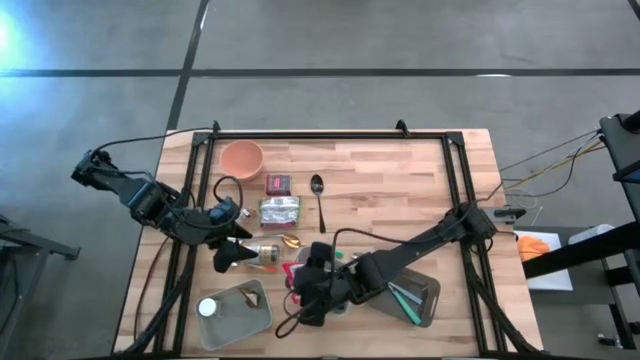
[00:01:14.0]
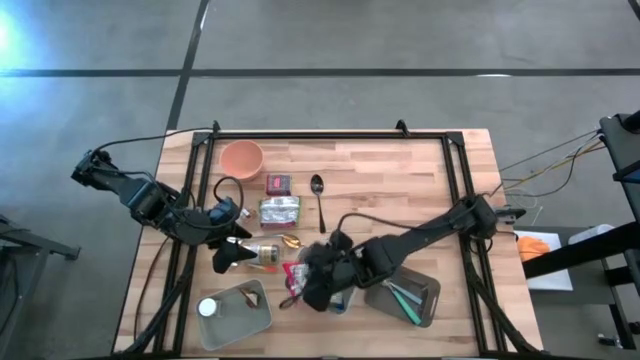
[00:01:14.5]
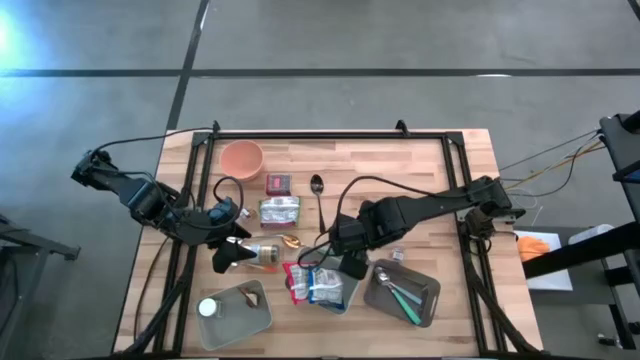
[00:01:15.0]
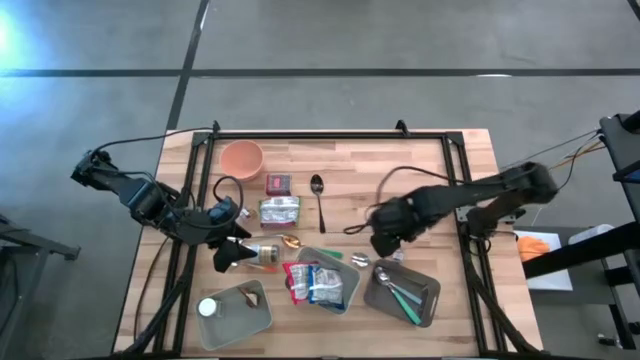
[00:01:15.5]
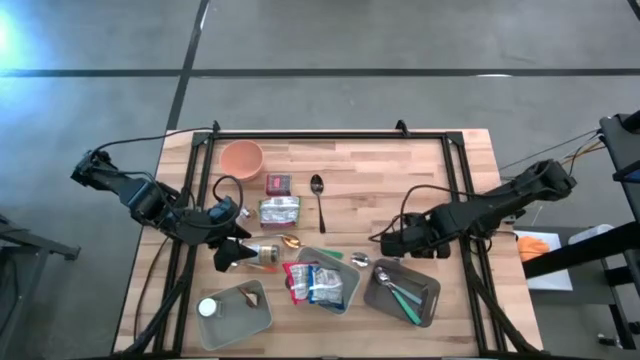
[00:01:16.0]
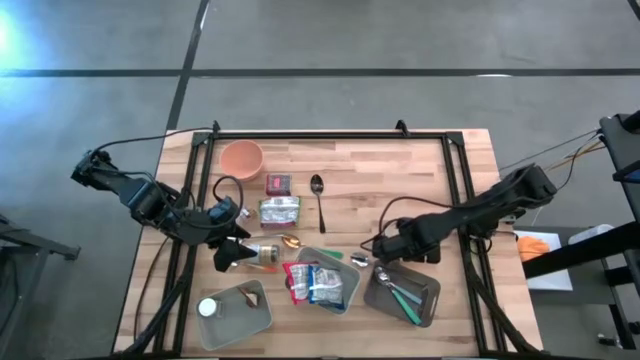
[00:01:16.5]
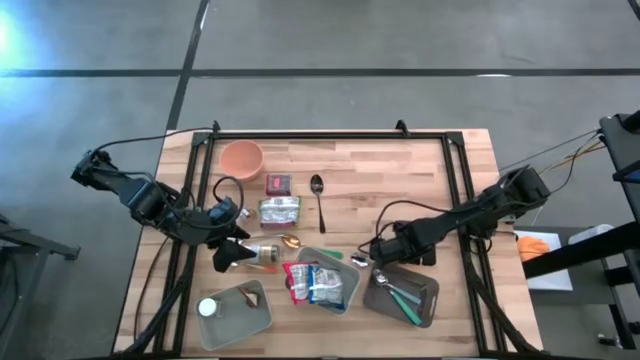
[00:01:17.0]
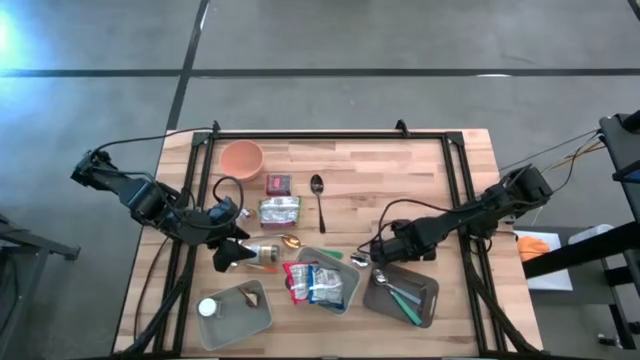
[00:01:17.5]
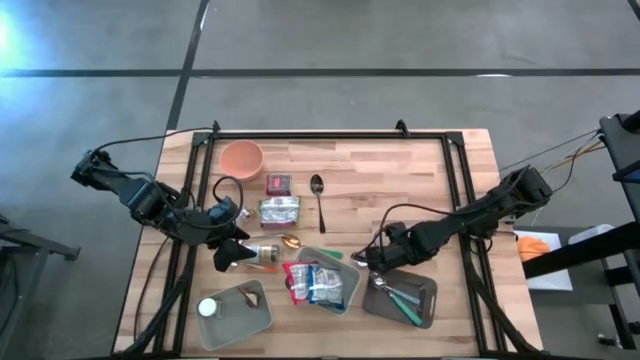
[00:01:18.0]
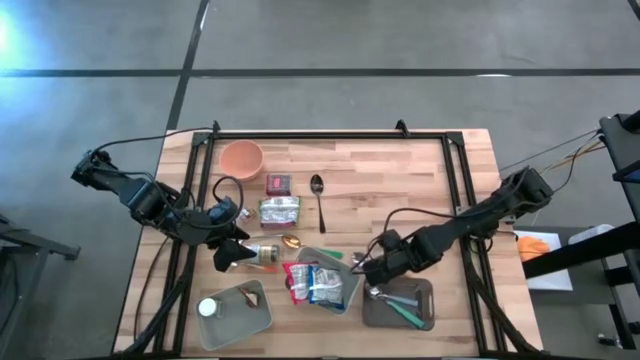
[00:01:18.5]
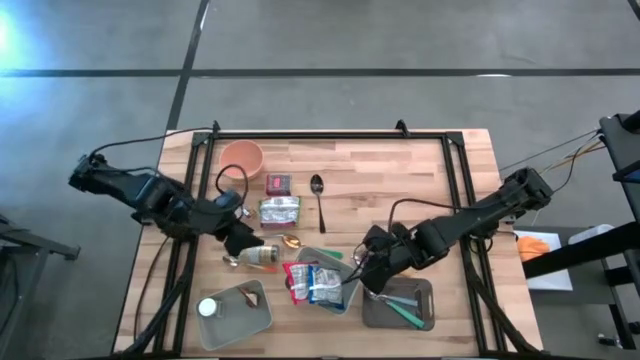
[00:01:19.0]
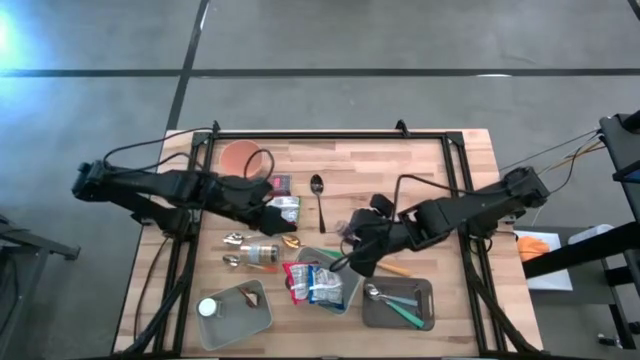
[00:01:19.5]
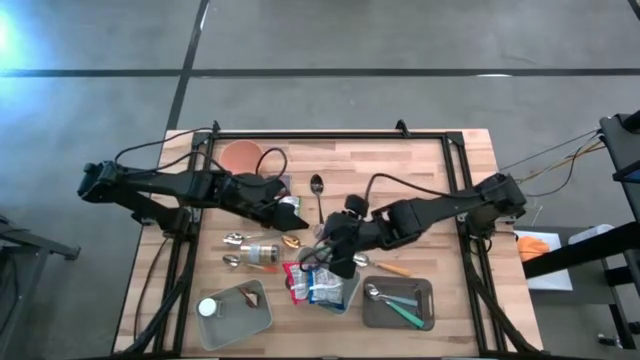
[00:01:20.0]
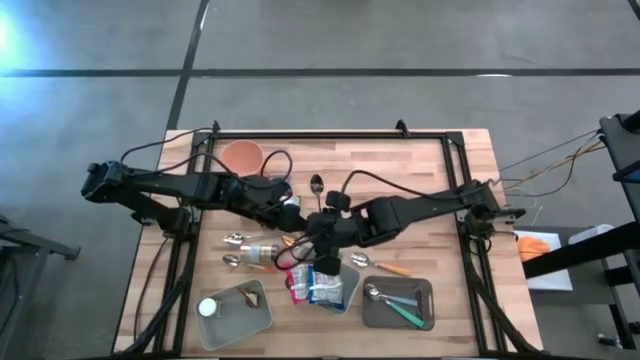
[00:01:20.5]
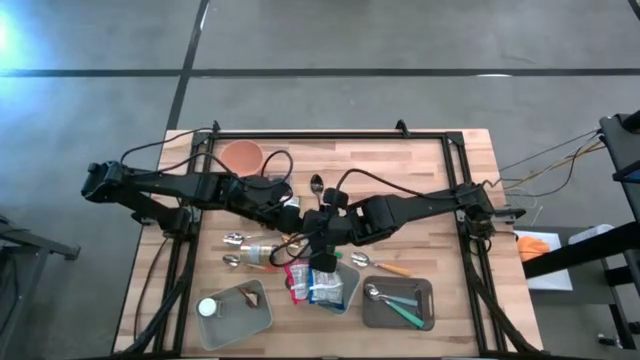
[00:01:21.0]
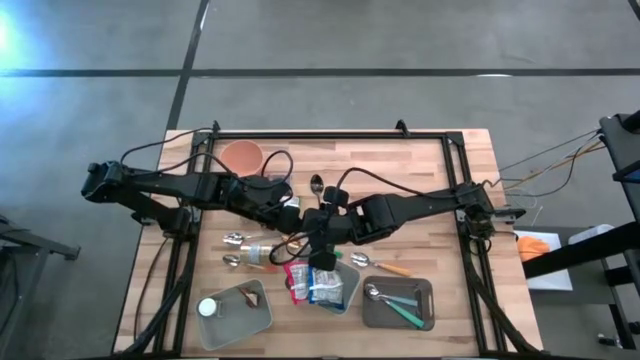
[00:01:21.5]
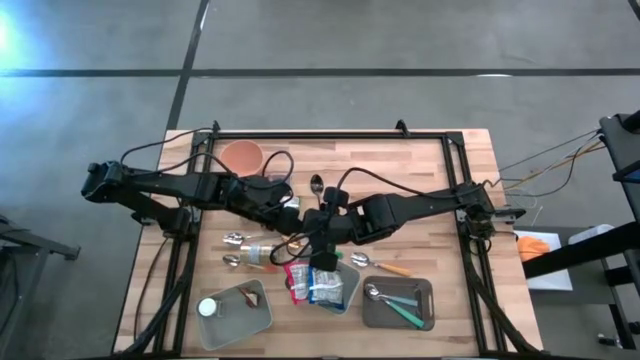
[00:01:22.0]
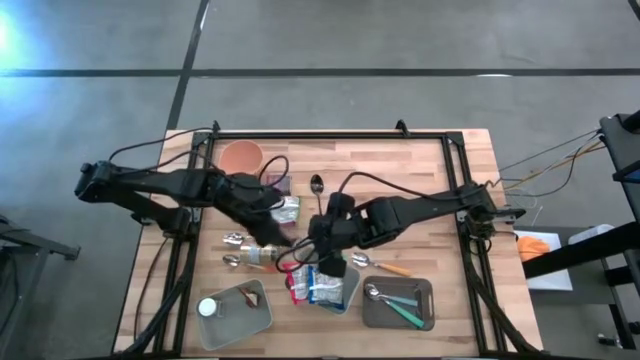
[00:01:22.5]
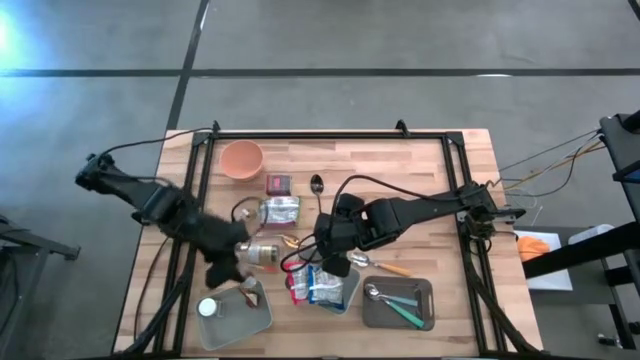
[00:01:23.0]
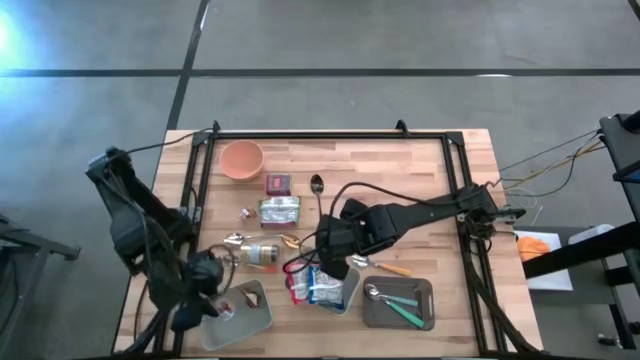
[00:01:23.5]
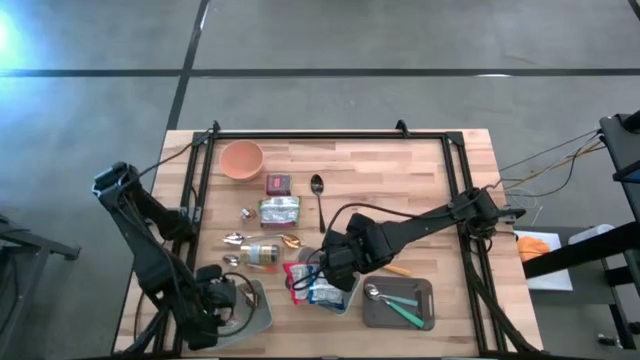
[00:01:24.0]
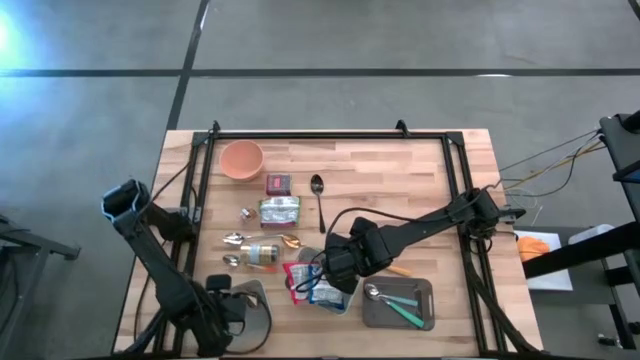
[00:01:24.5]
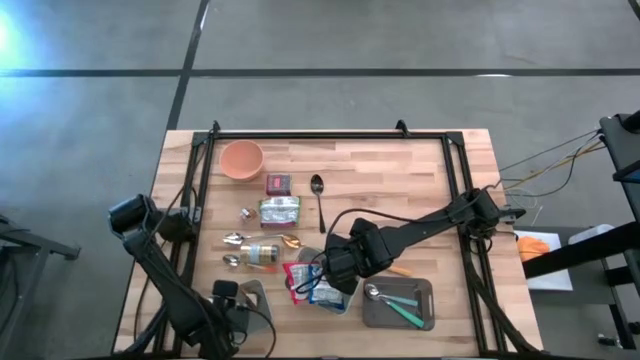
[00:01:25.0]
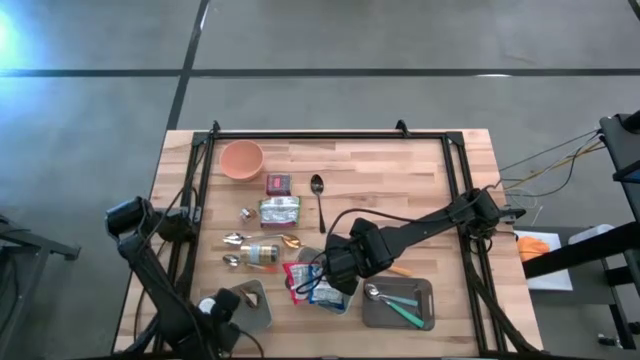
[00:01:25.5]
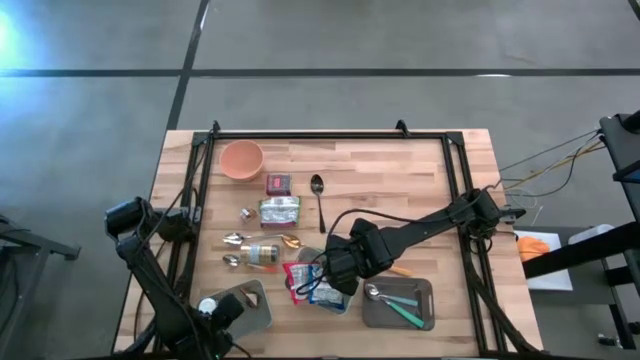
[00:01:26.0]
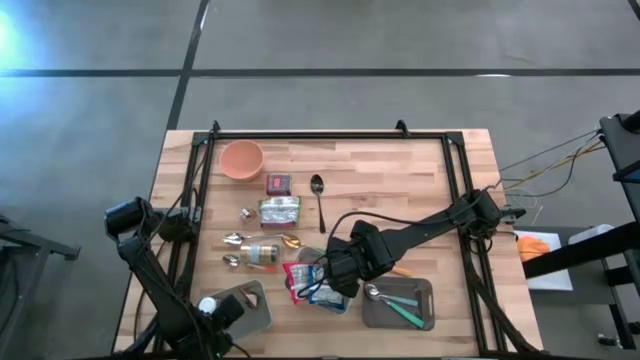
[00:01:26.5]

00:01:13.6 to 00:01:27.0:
Put the right brown seasoning bottle into the left gray bin

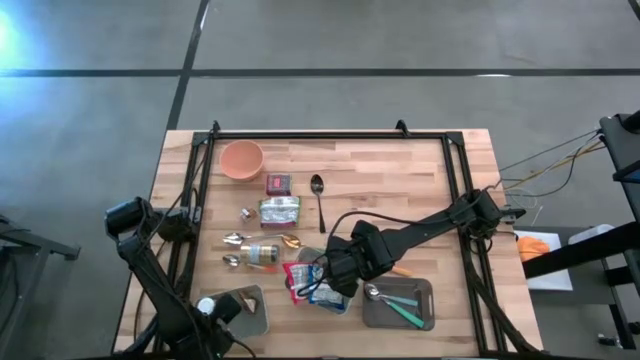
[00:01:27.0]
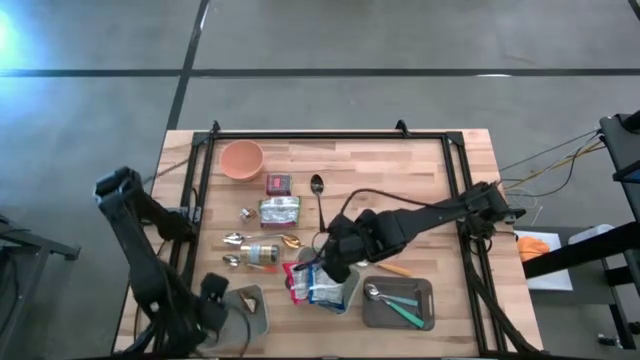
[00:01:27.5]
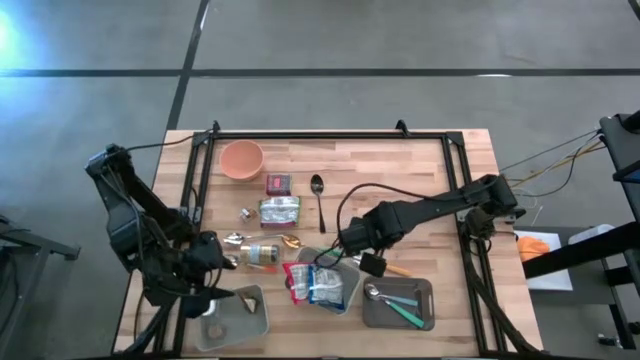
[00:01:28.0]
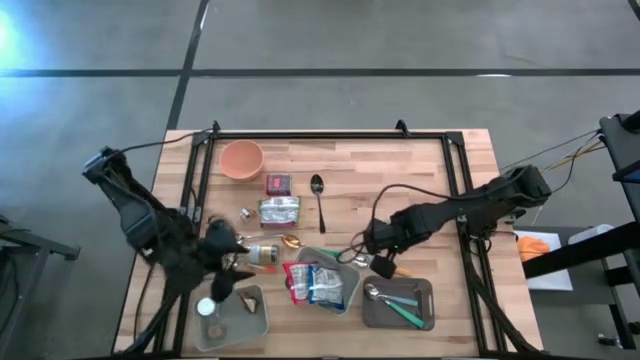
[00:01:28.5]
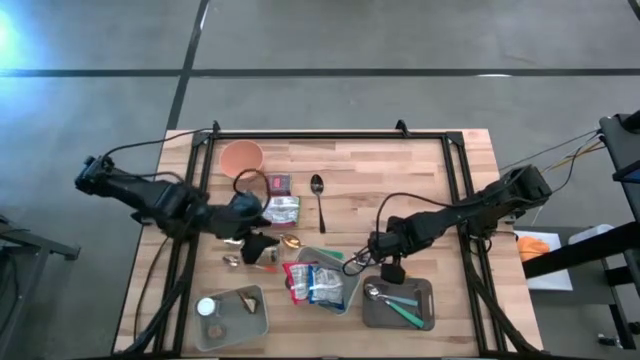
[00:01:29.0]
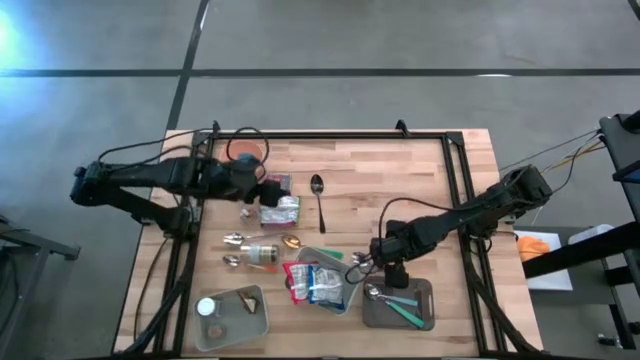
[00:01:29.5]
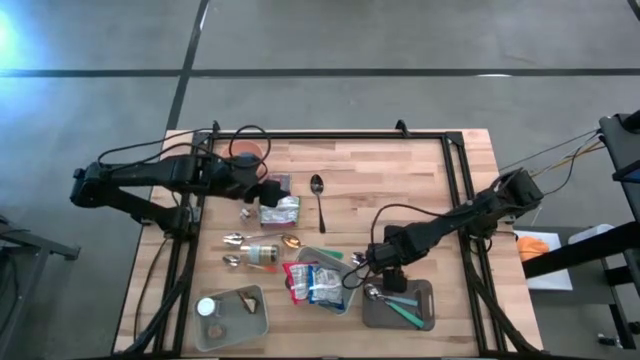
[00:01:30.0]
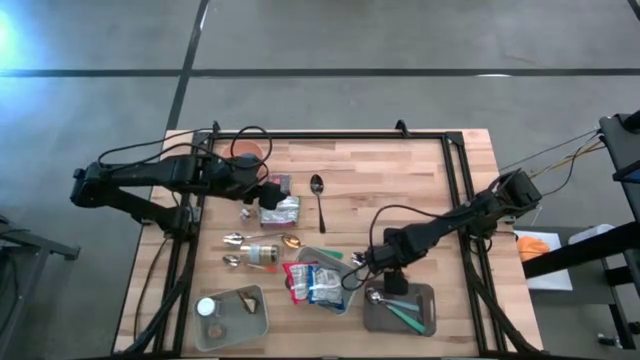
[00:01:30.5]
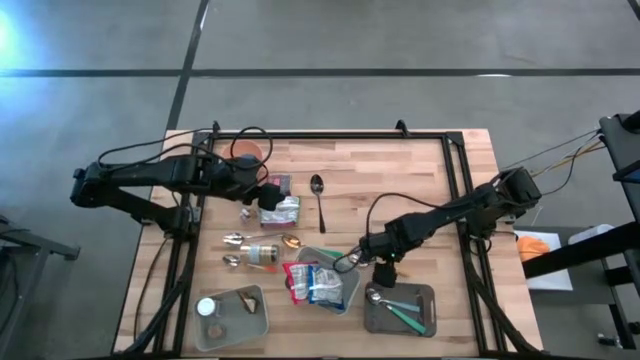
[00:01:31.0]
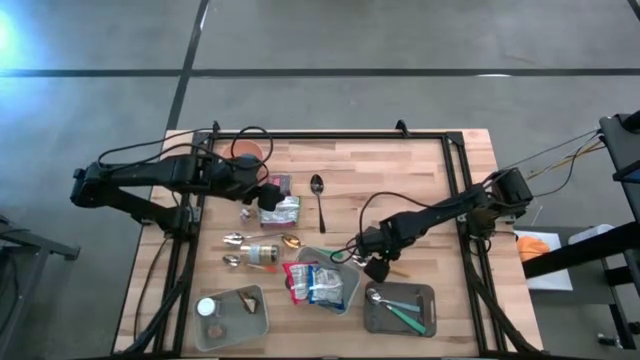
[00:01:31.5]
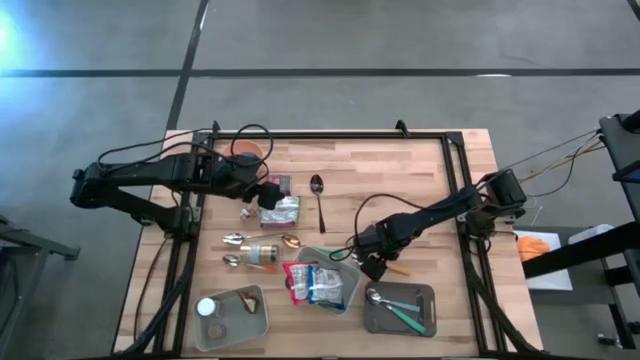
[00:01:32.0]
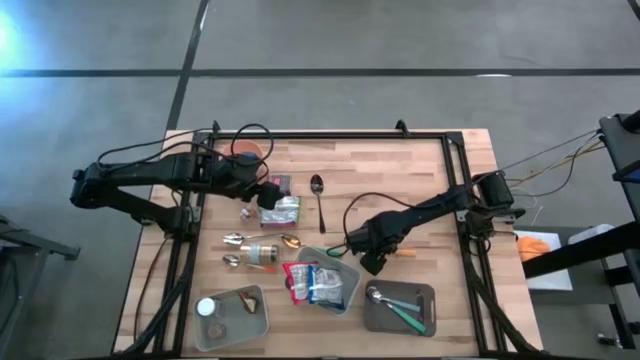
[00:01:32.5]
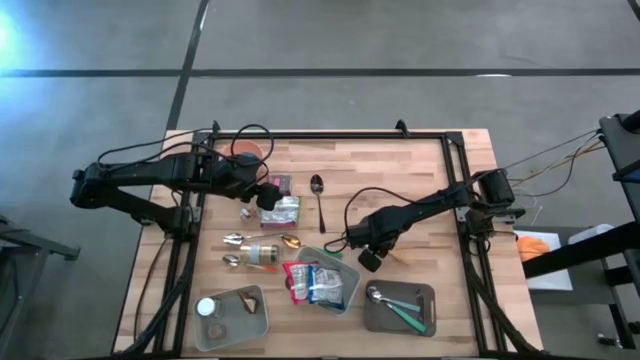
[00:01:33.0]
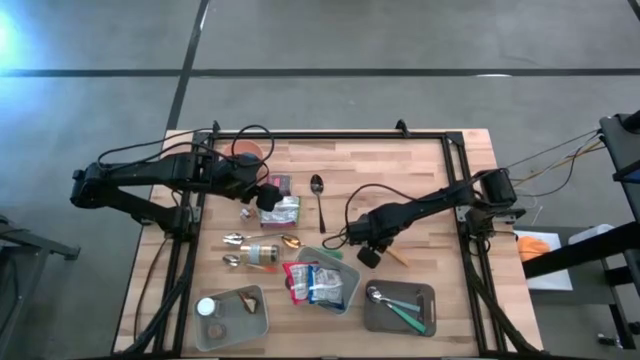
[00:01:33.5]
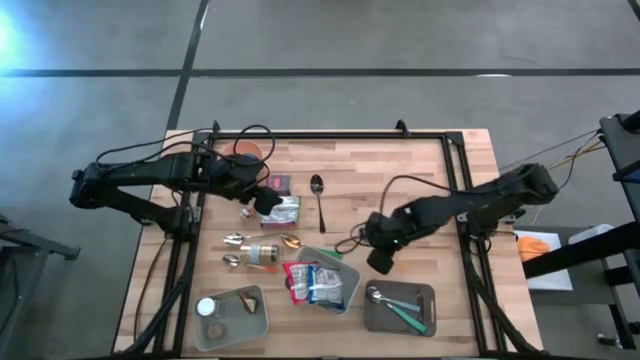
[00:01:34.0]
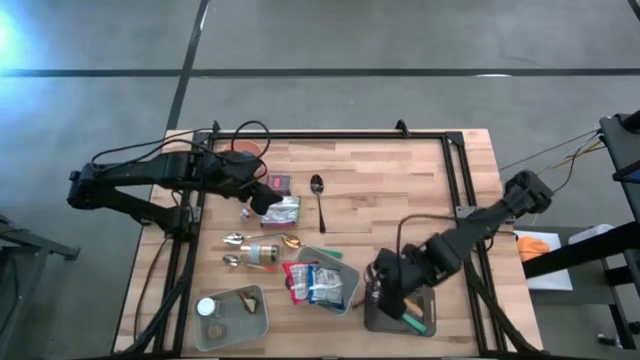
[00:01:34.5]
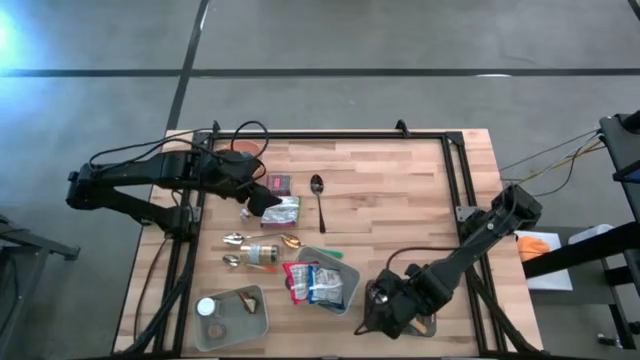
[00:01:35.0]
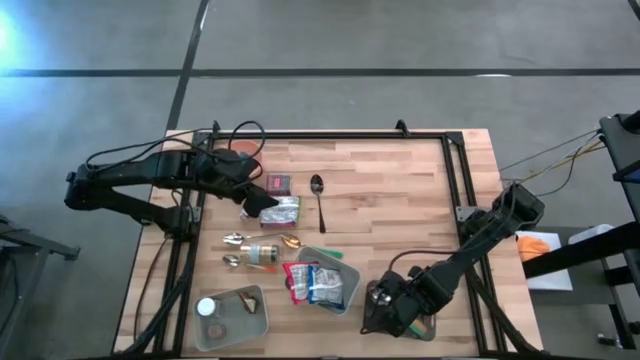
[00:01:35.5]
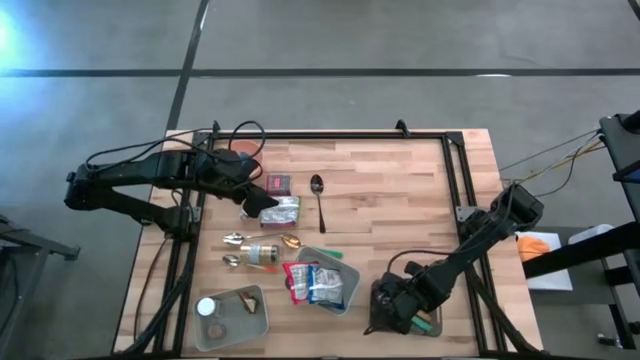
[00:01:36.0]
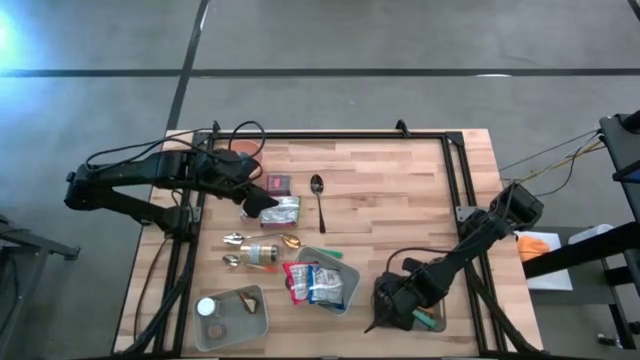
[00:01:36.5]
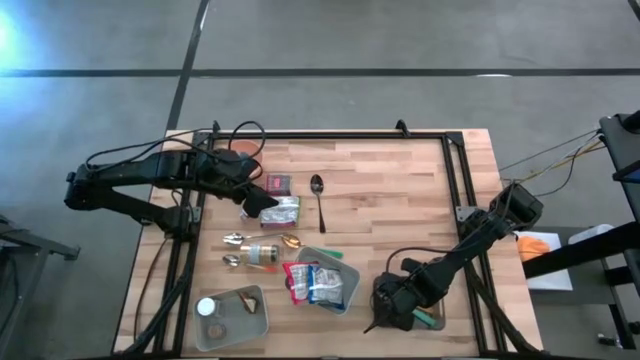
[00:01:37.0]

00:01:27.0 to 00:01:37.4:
Put the yellow spoon into the black bin
